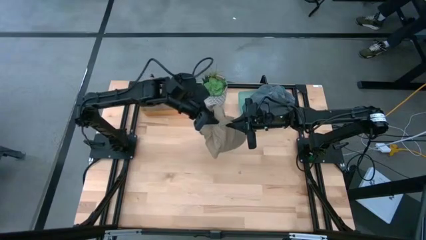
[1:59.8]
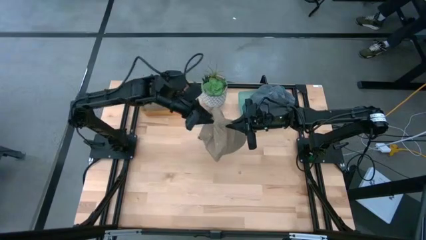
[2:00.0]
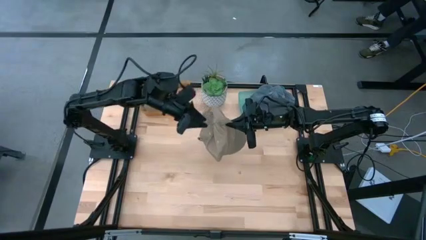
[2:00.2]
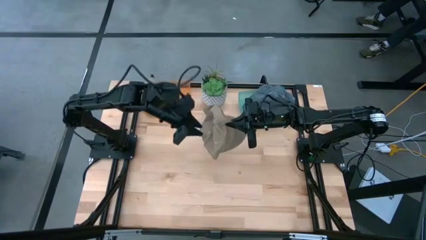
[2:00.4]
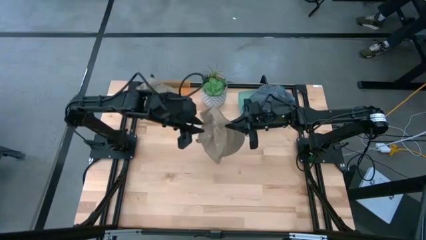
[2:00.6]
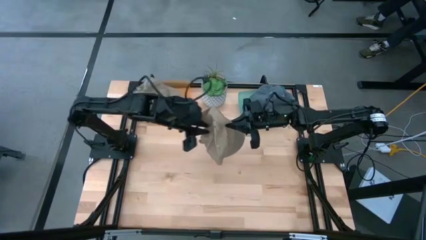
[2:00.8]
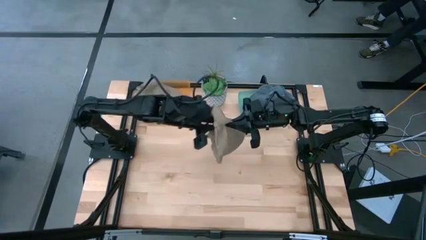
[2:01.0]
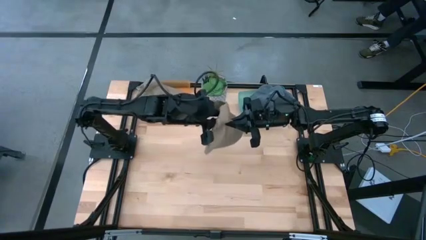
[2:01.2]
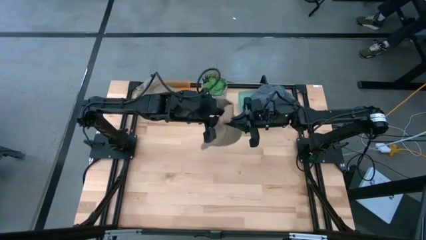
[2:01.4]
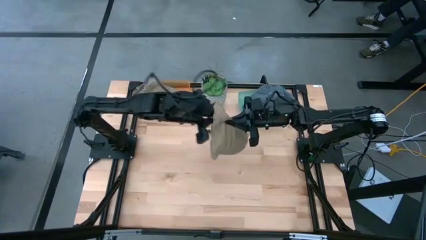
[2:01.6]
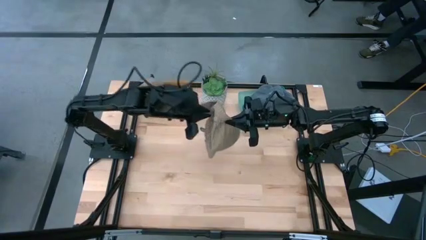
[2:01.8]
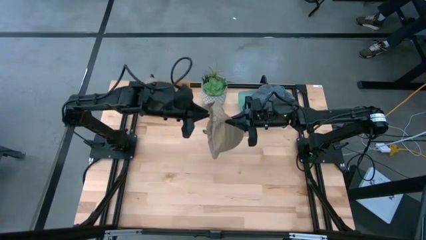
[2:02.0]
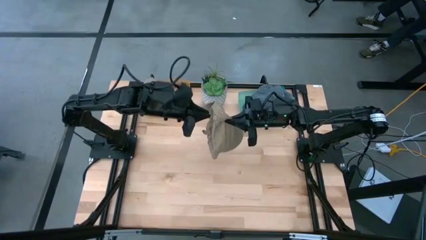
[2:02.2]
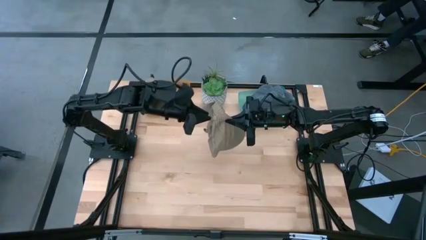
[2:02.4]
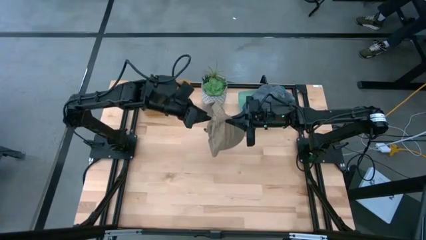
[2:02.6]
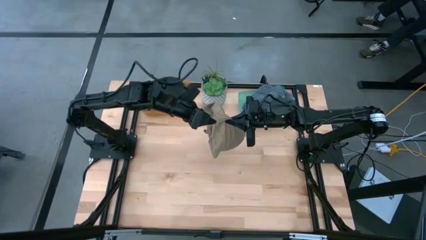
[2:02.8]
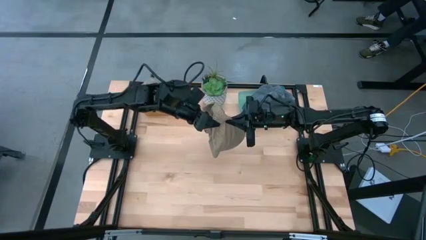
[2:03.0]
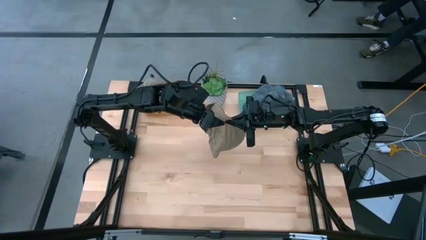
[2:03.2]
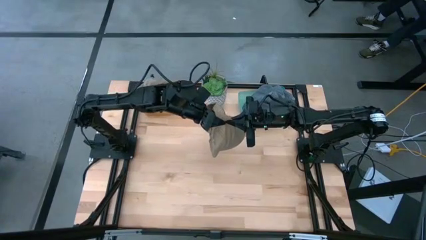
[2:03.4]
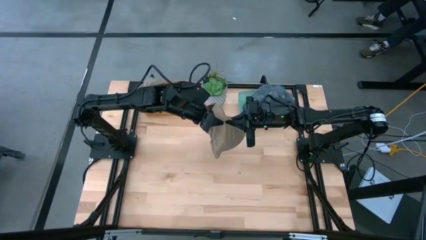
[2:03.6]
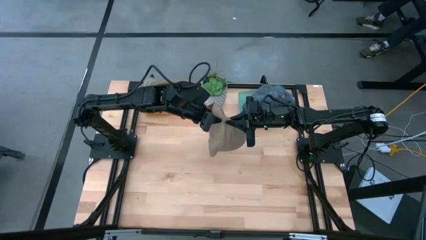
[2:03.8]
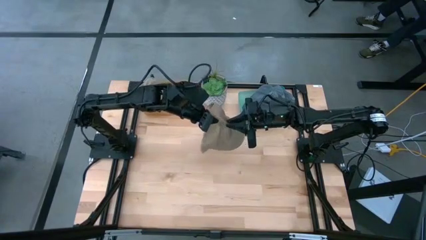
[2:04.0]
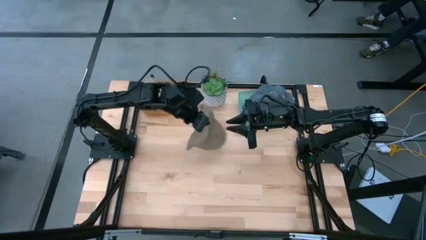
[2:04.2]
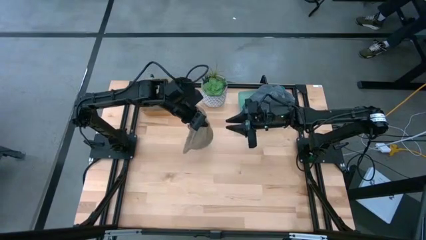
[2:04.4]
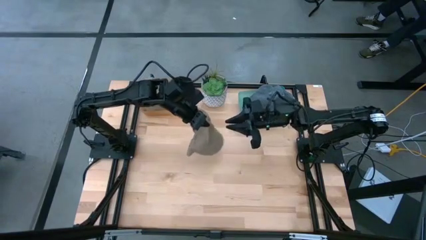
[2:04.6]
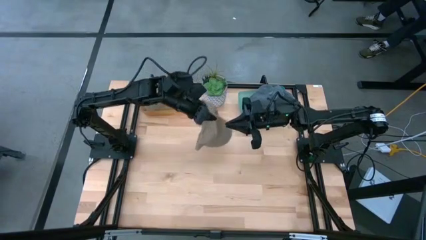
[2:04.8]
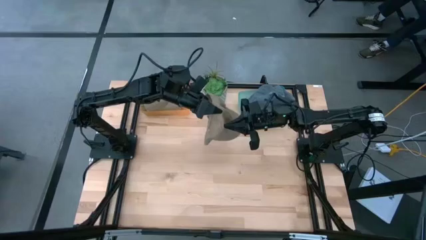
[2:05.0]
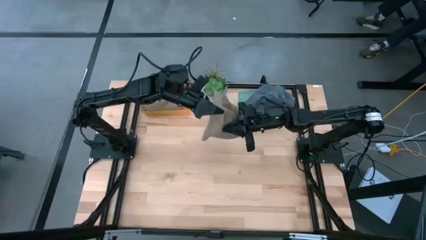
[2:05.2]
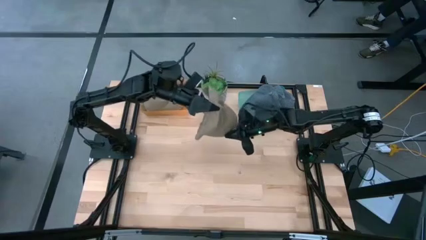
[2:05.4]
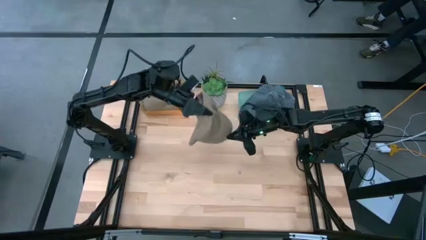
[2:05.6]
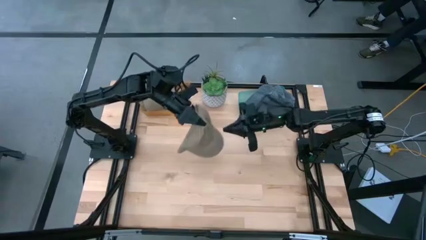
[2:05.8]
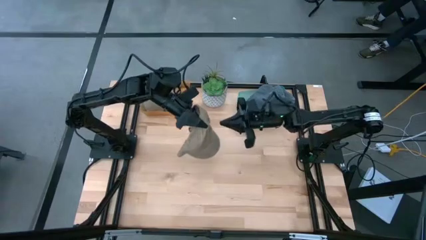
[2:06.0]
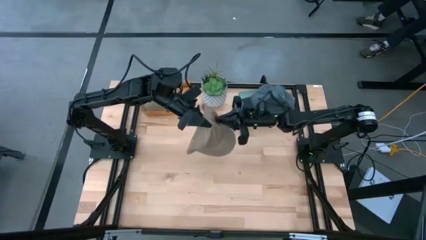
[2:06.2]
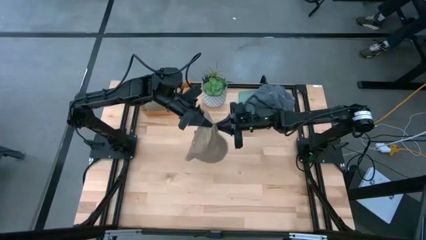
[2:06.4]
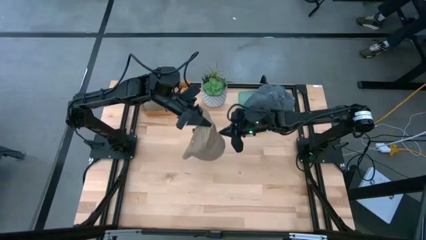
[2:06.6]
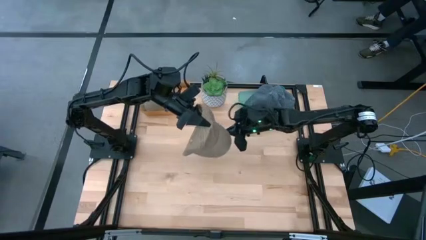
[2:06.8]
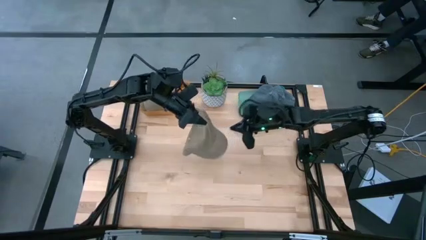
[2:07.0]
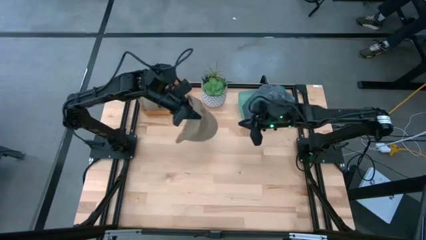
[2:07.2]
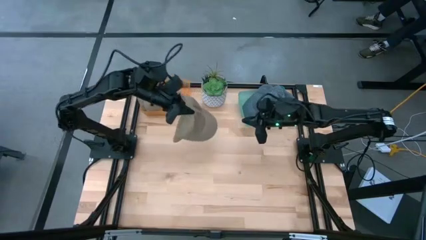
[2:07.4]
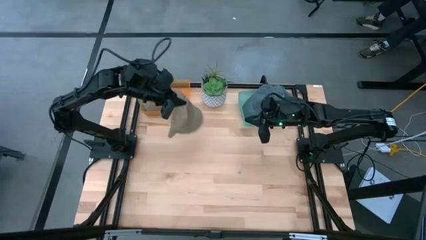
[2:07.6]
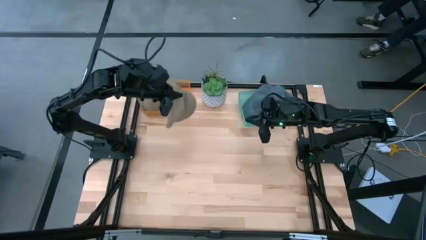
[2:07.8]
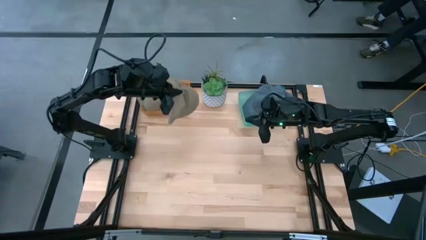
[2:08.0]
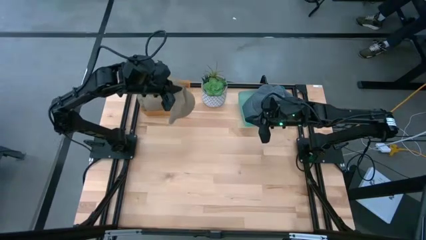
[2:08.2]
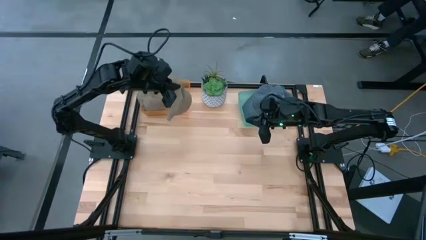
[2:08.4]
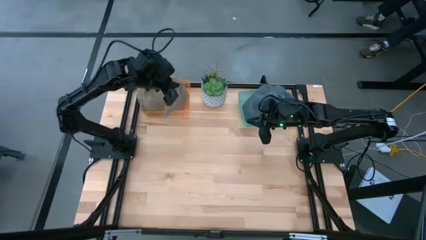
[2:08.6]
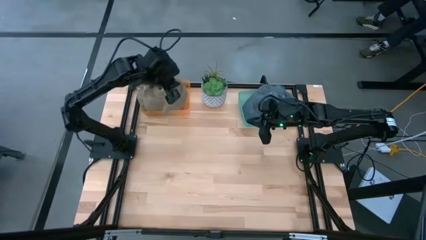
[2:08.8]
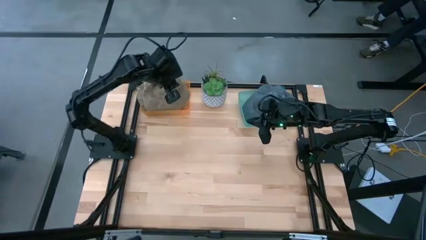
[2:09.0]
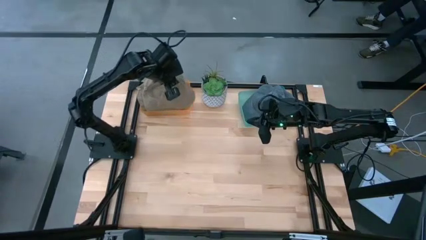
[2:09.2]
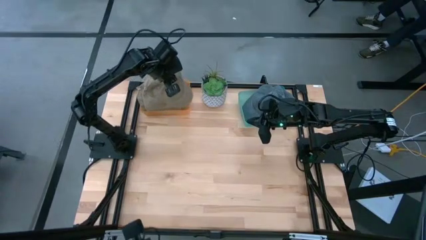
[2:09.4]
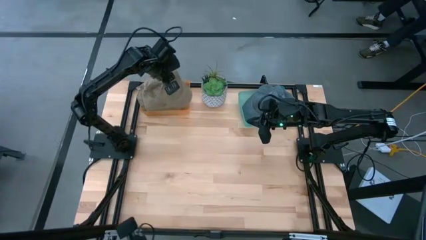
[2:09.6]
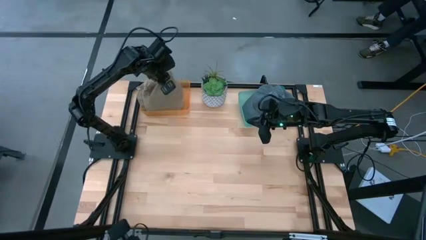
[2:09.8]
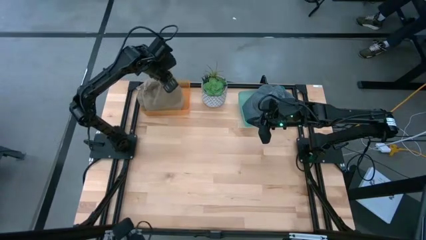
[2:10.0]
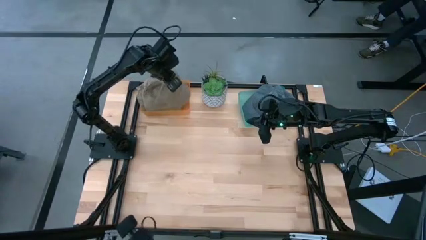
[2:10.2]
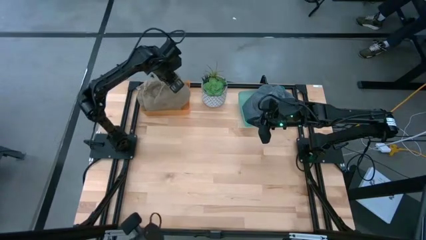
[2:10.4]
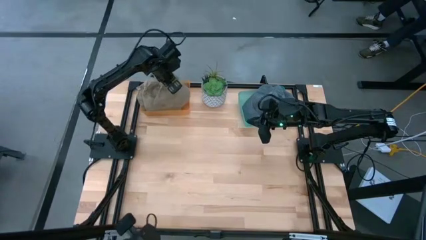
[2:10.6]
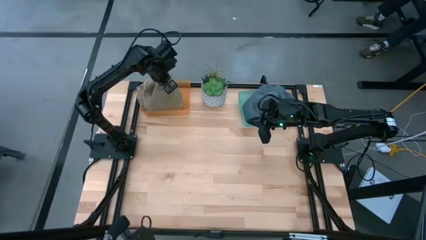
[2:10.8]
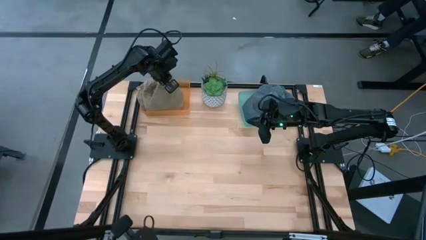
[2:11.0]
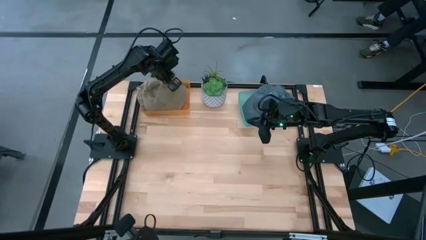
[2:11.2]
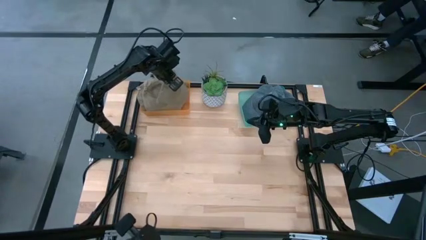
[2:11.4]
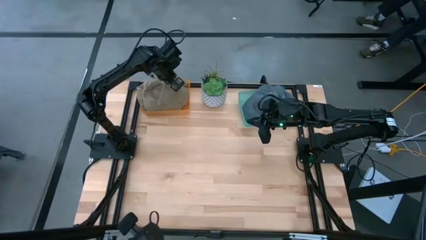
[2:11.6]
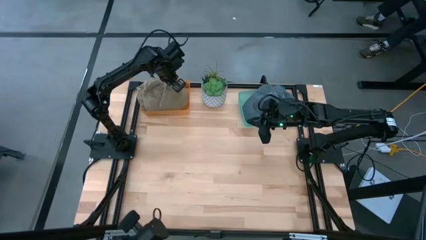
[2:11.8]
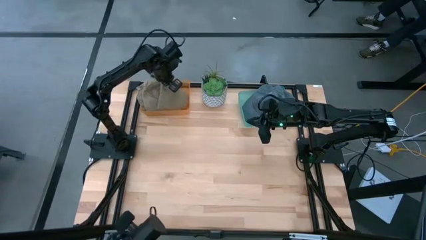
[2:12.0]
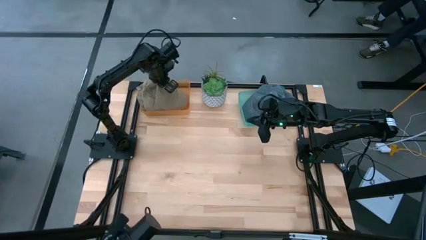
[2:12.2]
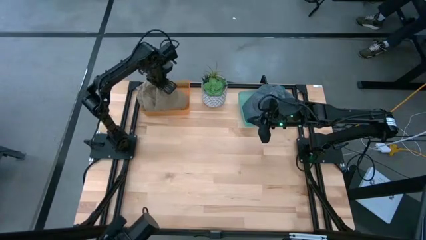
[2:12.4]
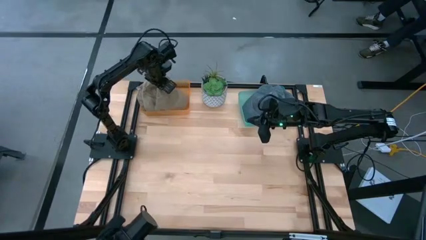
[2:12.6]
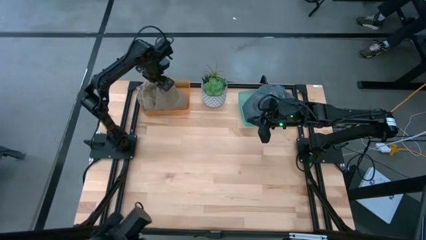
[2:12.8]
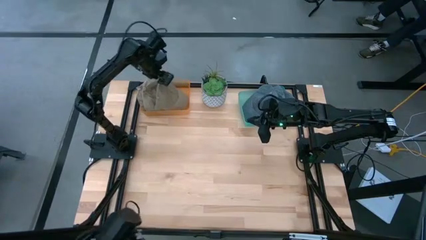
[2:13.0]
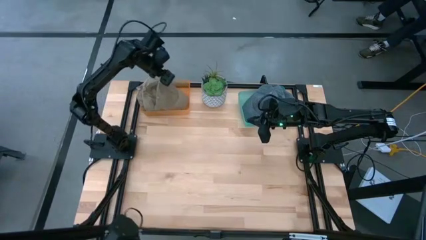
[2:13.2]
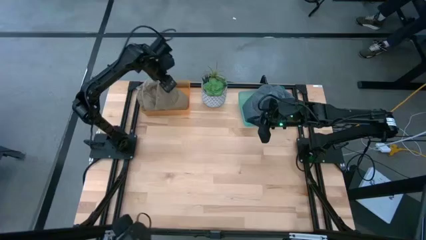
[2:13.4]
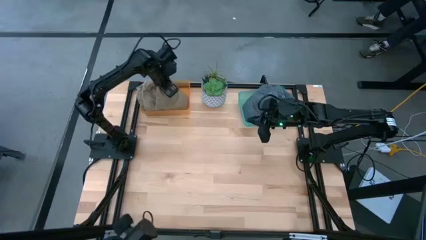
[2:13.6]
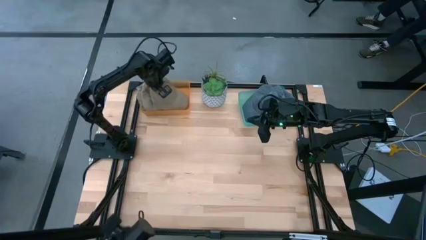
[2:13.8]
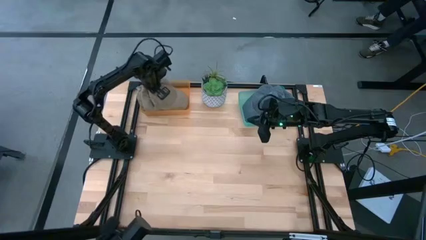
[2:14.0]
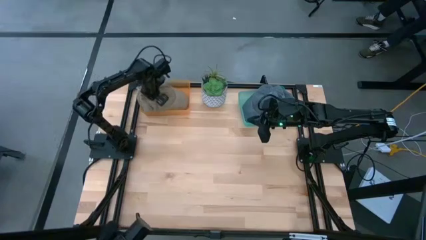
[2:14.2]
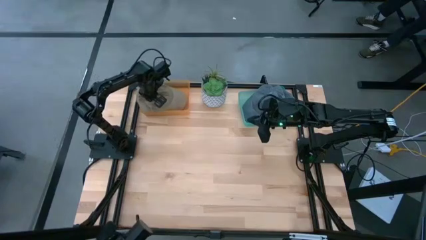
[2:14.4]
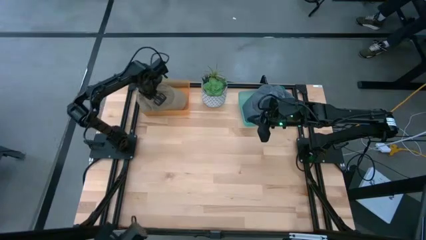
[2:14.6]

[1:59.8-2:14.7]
Task: Pick & Place hat
Put the brown cap into the orange bin

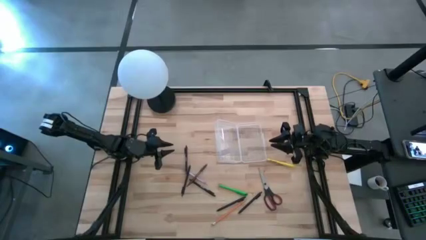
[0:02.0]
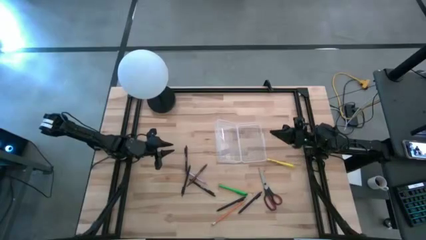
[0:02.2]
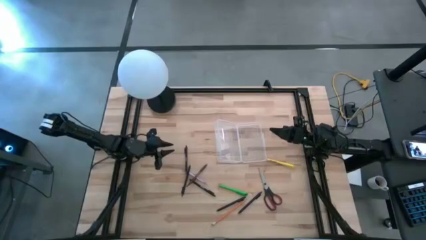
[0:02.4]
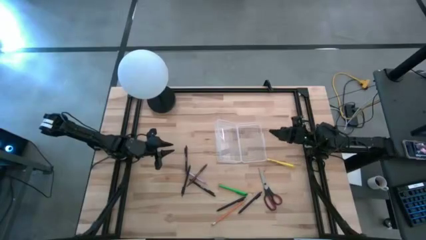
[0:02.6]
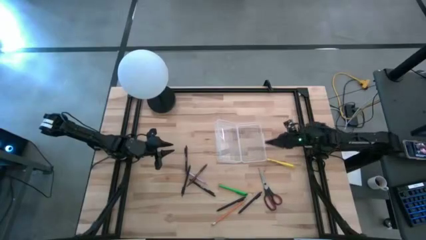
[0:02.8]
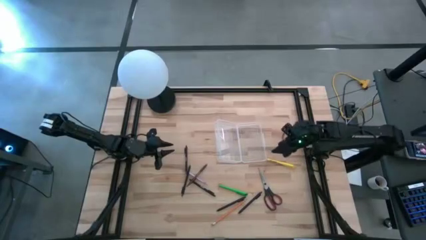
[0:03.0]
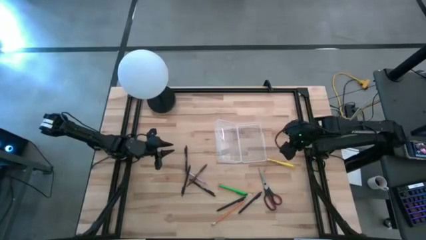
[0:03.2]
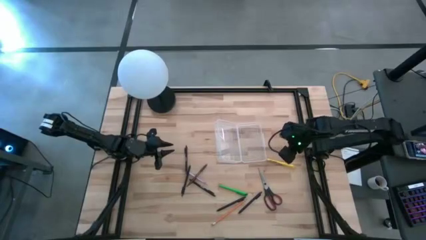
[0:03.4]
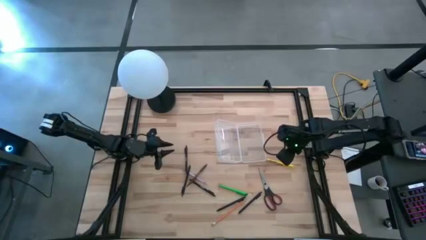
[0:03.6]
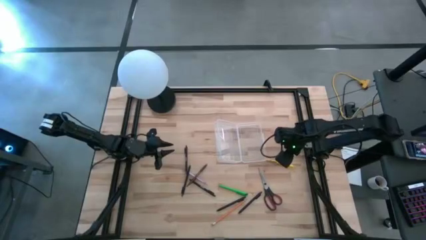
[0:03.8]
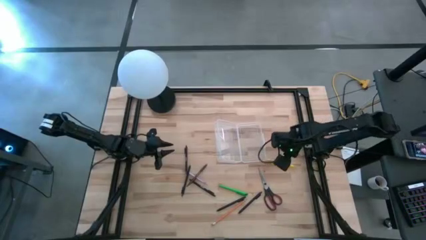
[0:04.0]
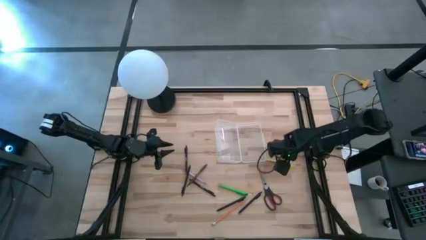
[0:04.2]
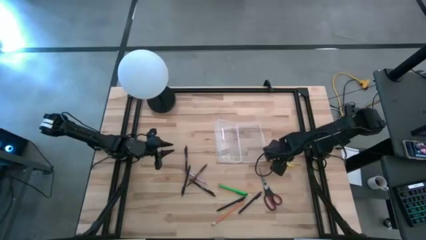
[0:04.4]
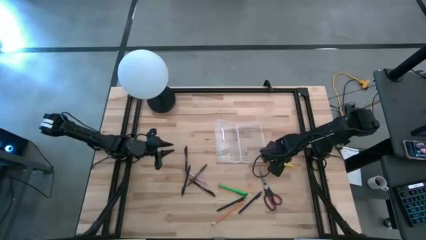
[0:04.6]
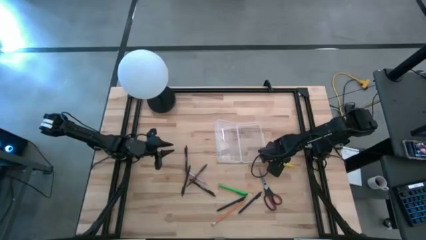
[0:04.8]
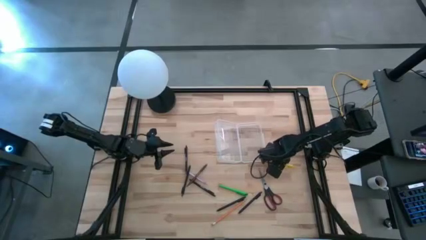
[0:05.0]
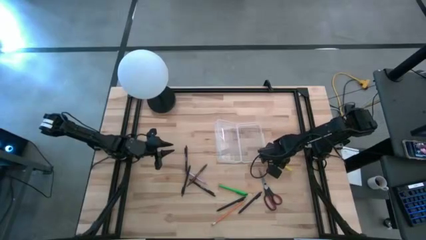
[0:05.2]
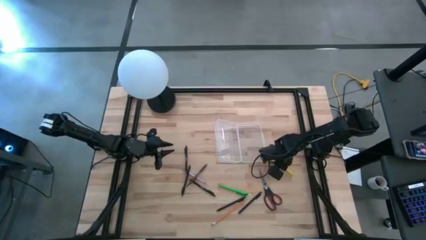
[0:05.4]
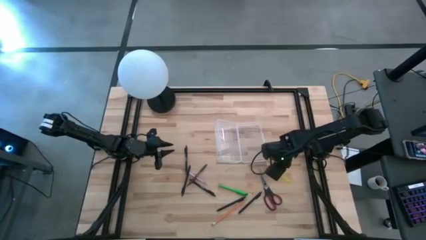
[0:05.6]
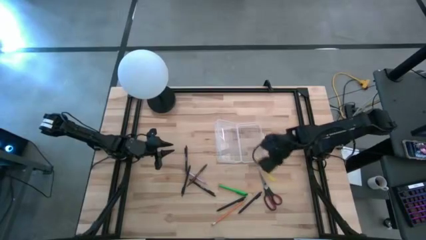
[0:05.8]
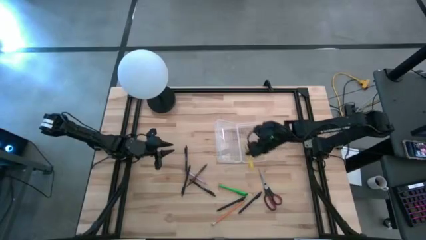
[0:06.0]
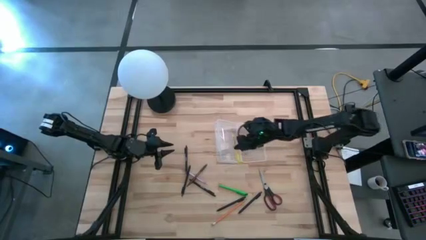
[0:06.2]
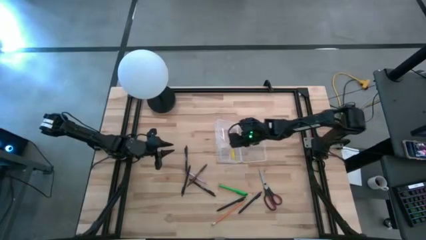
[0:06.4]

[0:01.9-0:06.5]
Task: Pick & place school supplies into a supply box
Put the yellow pen into the supply box
